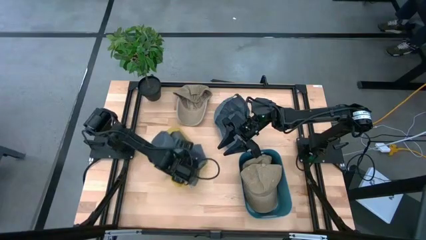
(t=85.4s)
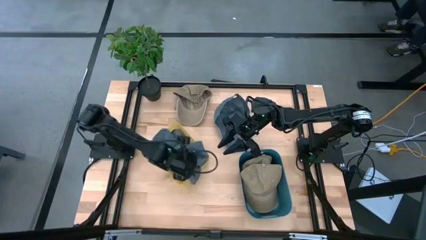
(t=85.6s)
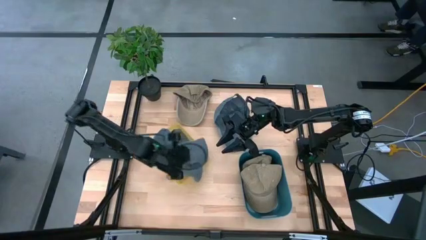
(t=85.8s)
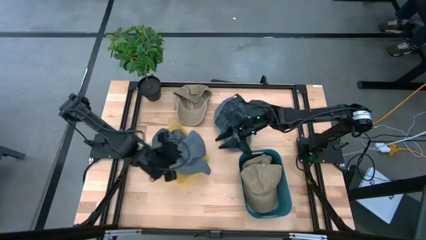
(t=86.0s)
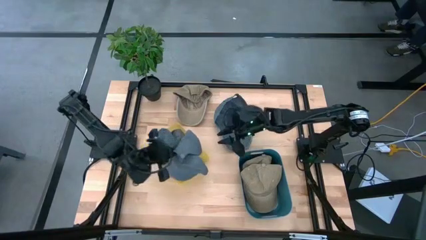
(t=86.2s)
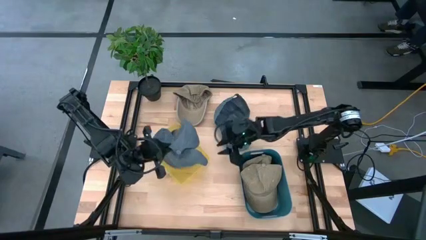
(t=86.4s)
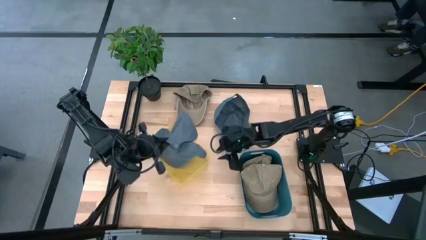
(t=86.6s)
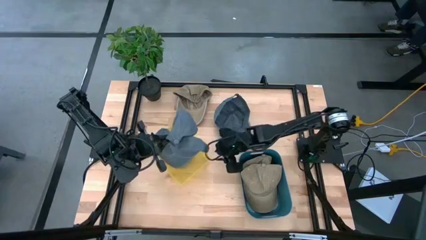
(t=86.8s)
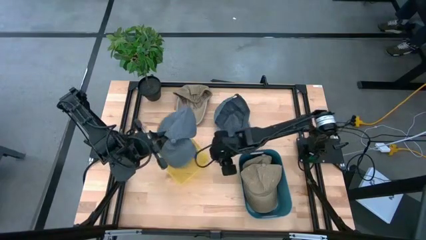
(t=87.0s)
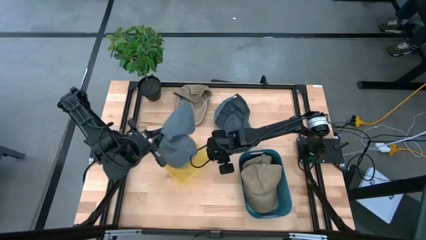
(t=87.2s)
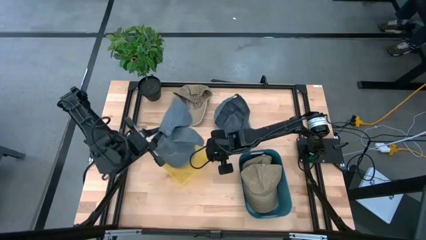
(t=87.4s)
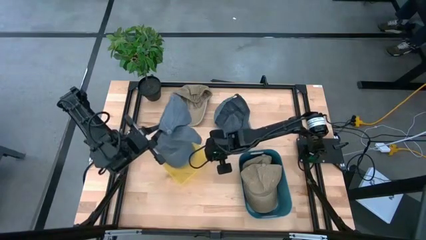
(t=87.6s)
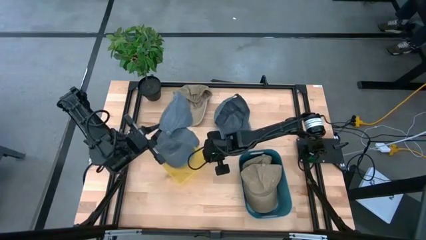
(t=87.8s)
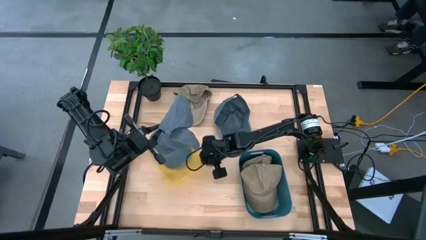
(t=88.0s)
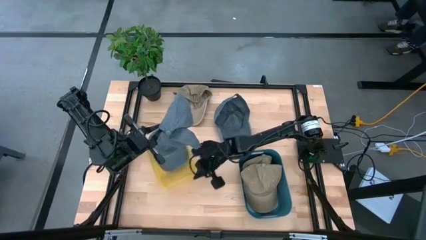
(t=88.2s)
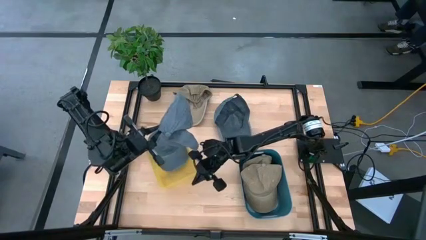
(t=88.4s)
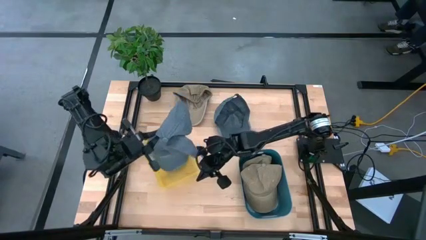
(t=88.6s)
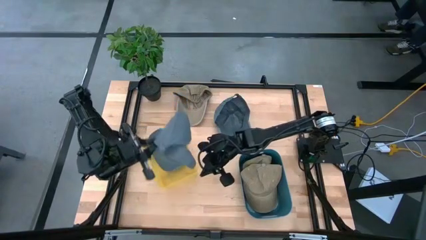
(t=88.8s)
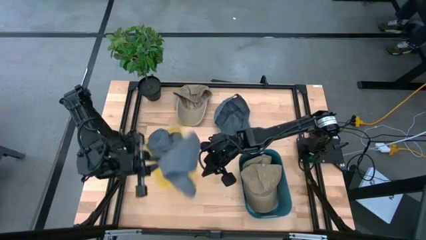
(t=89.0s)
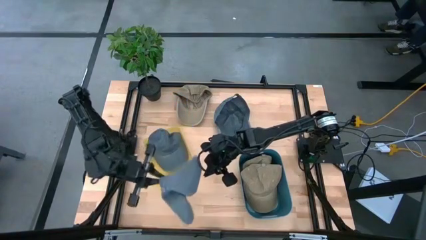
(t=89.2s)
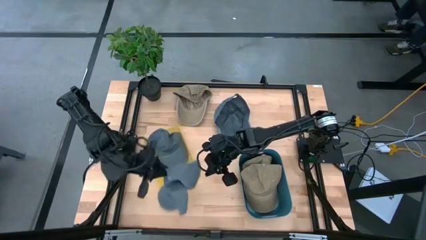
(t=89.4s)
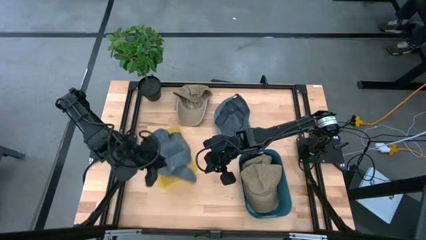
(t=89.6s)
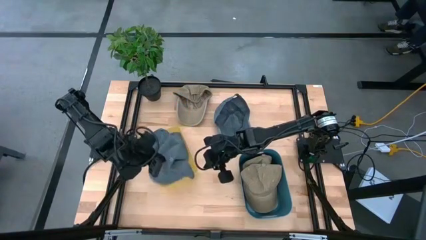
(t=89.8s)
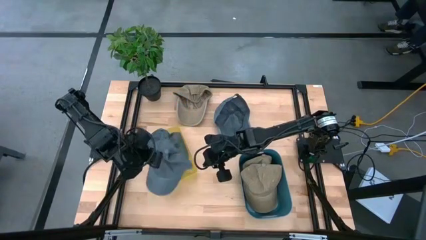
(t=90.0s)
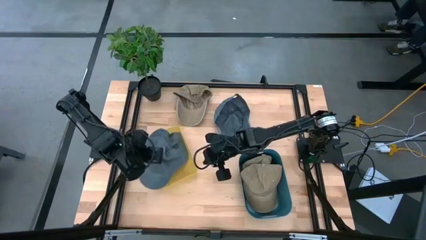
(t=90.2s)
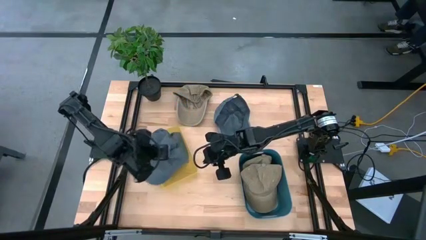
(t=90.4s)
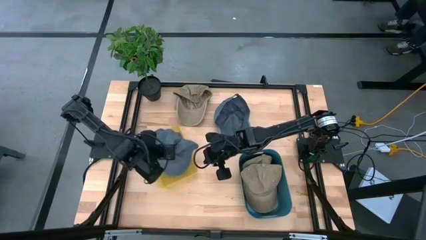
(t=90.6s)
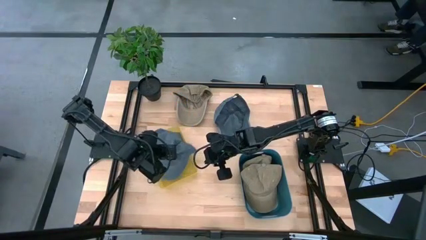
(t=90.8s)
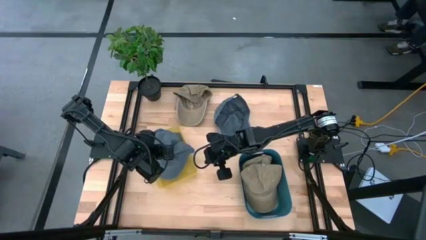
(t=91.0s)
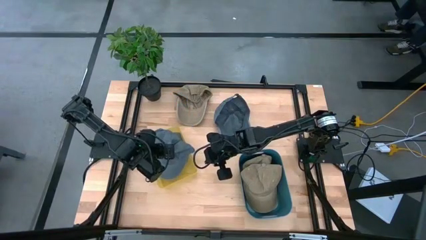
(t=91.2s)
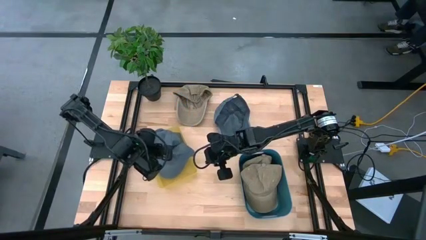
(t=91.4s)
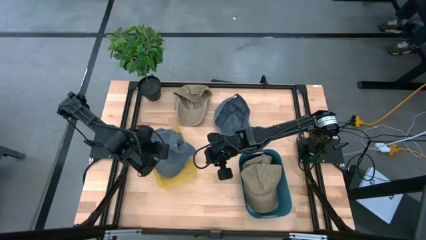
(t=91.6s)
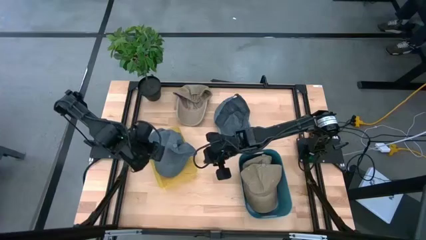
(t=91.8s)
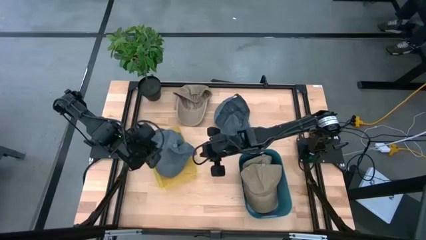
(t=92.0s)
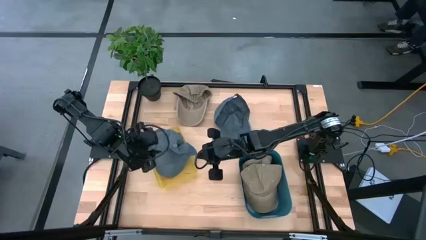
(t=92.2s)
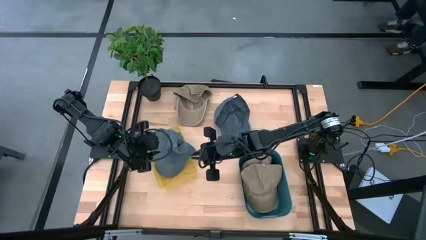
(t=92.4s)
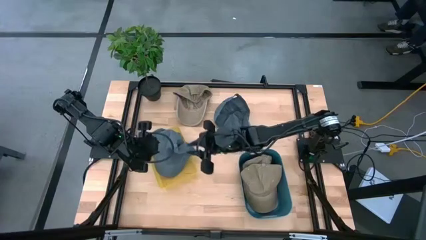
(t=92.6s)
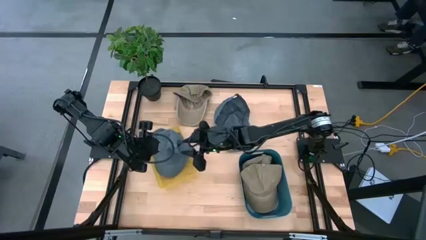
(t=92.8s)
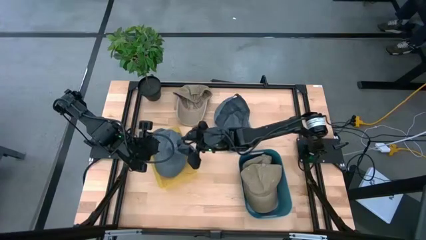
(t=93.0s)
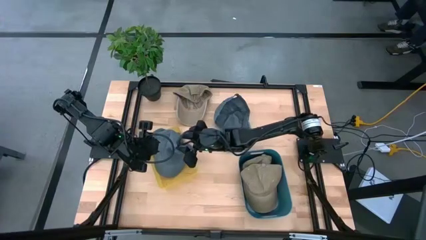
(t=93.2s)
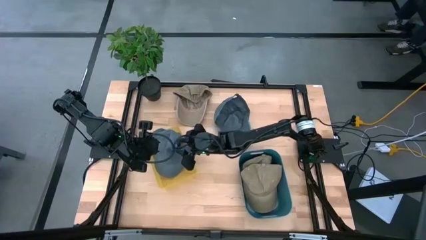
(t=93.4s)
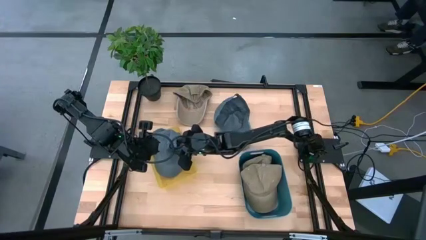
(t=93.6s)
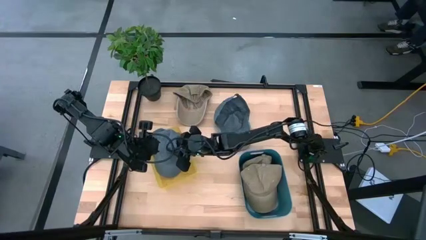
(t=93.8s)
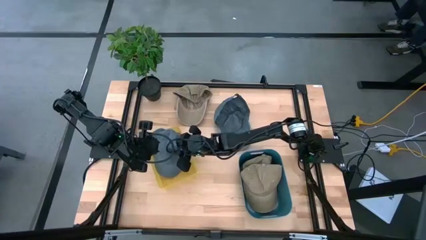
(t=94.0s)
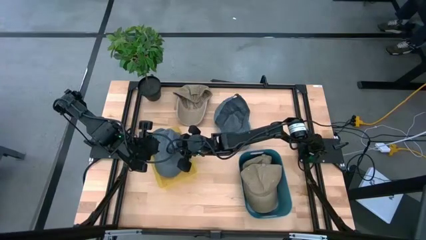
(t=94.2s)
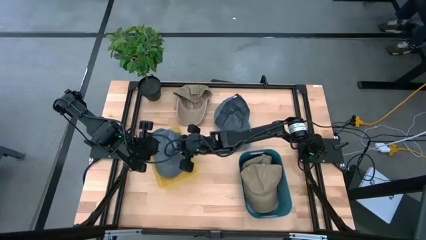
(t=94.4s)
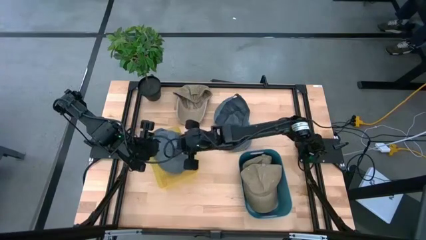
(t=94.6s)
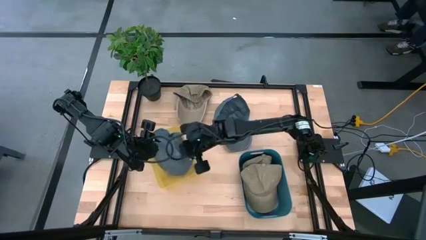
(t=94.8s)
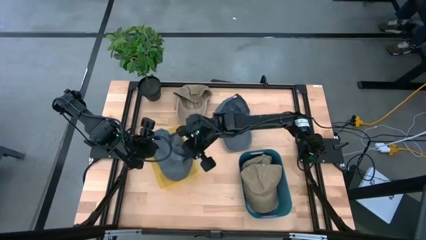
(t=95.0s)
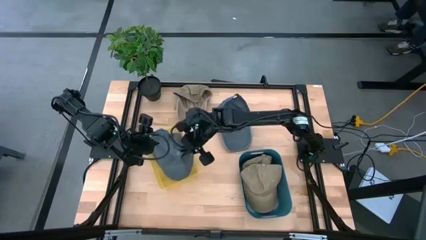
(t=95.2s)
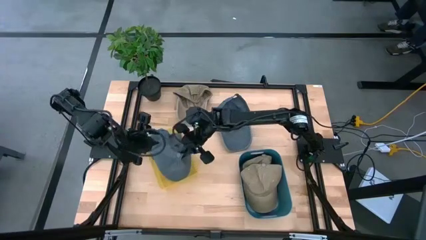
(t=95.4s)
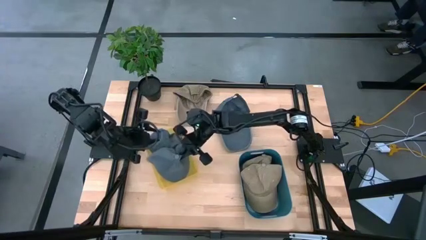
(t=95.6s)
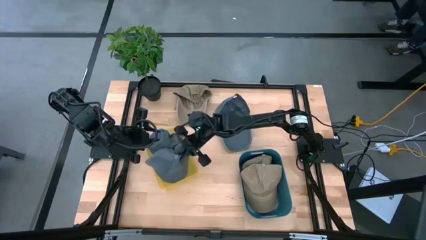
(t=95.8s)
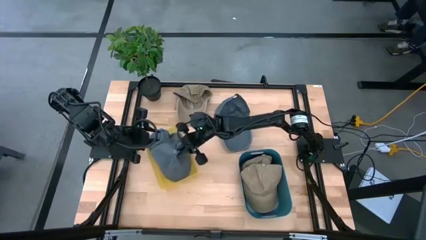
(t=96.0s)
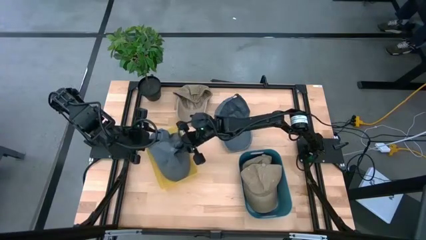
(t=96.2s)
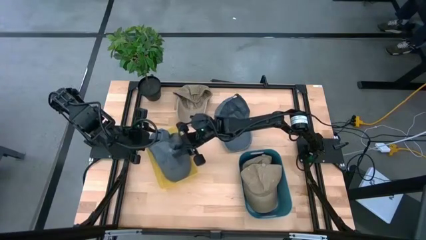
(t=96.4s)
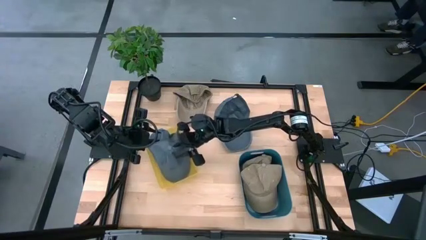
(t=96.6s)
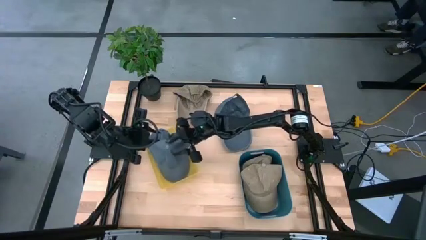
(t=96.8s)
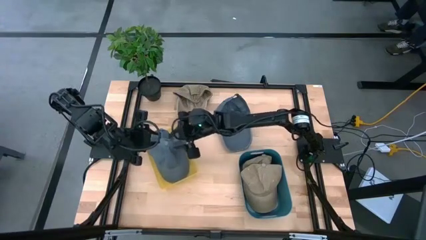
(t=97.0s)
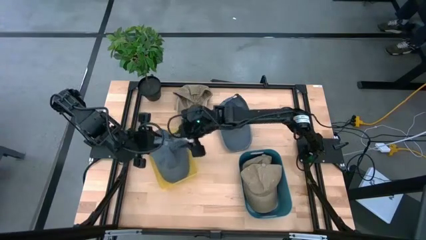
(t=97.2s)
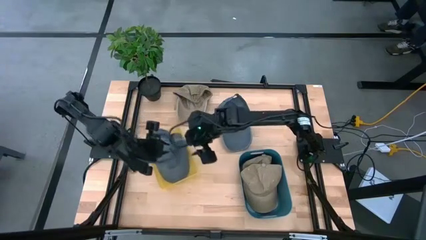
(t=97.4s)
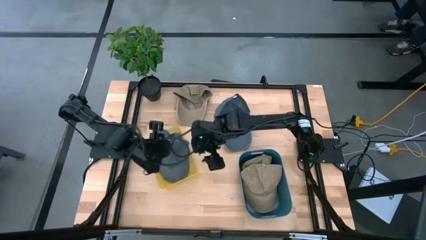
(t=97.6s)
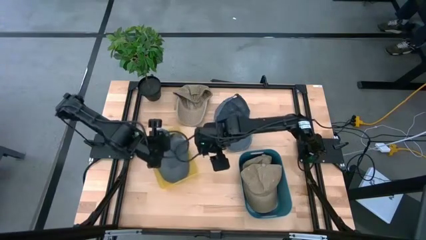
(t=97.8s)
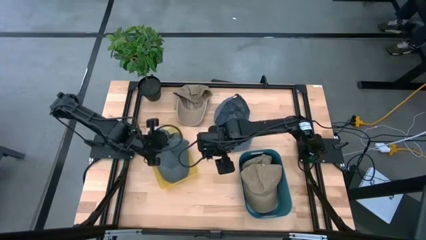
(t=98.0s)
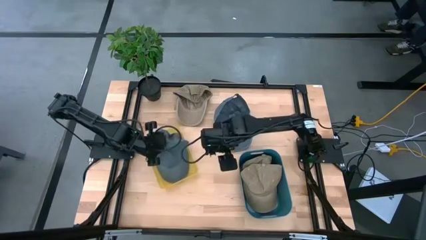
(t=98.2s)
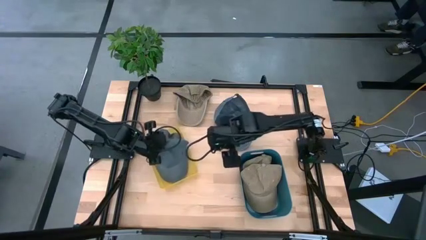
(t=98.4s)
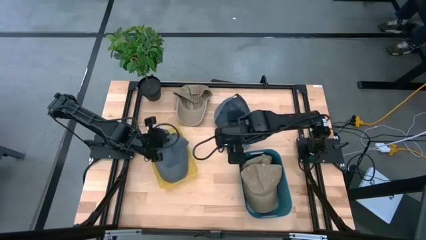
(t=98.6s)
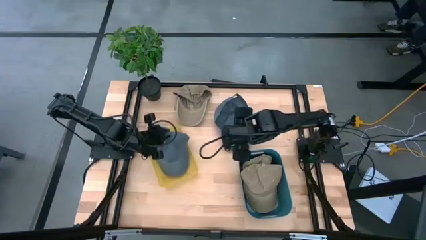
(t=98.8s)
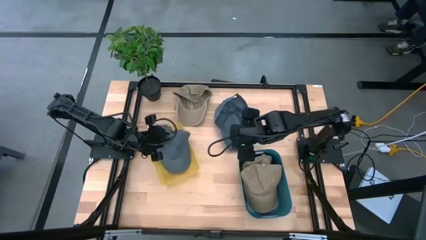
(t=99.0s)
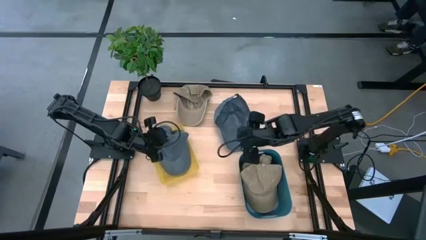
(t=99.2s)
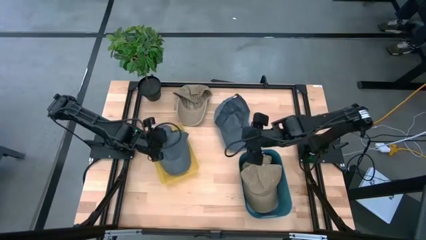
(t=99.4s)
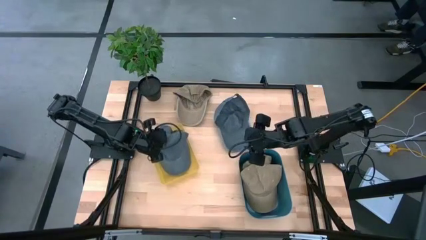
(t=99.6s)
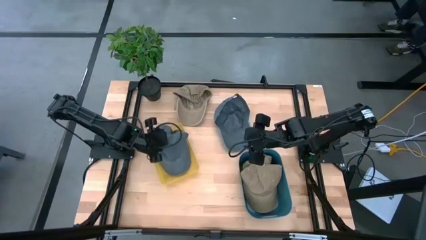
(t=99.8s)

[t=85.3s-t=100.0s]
Task: Pick & Place hat
Put the left gray cap into the yellow bin
